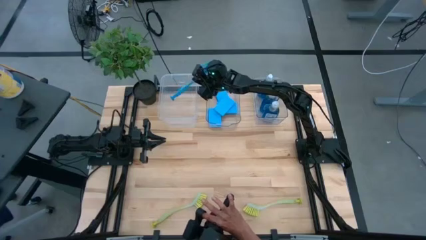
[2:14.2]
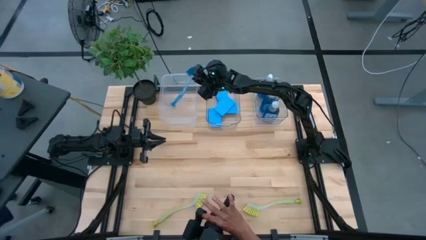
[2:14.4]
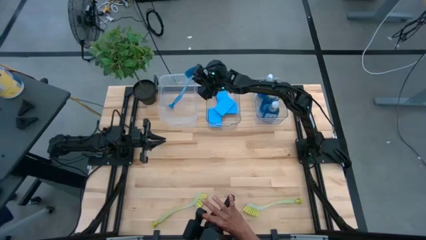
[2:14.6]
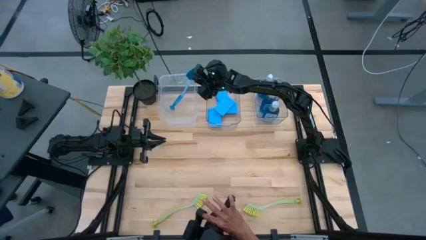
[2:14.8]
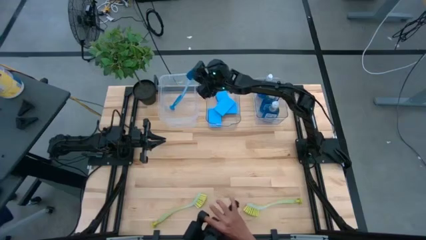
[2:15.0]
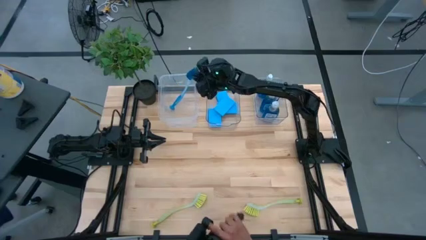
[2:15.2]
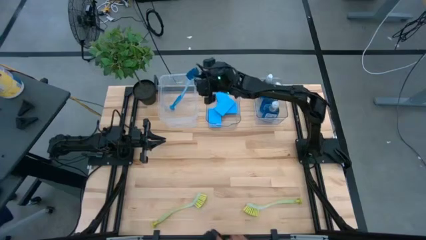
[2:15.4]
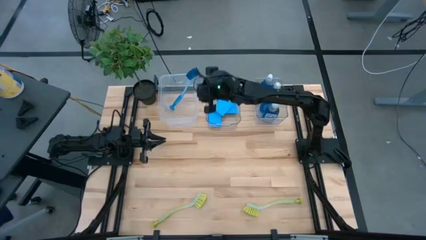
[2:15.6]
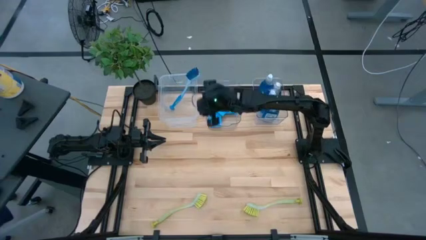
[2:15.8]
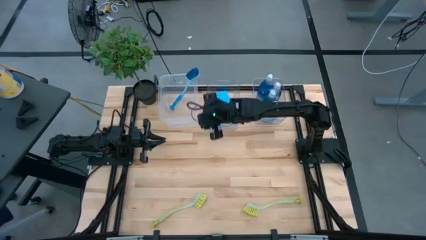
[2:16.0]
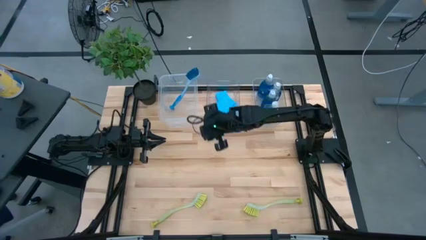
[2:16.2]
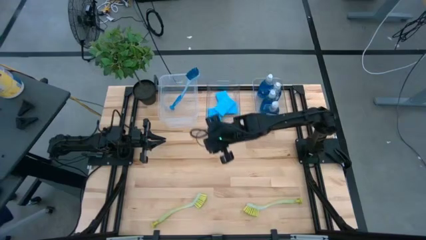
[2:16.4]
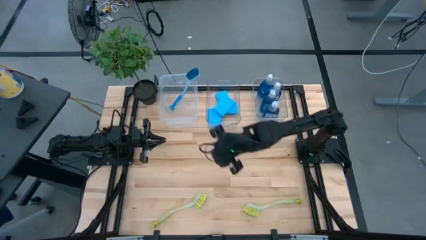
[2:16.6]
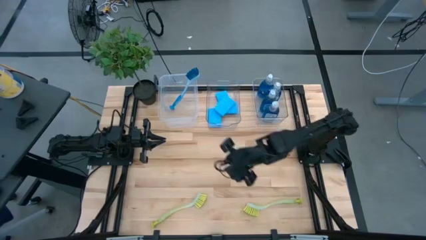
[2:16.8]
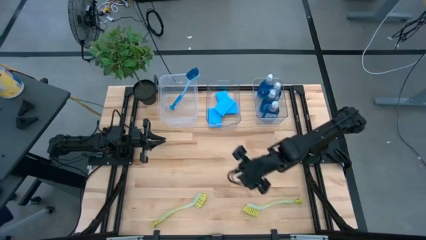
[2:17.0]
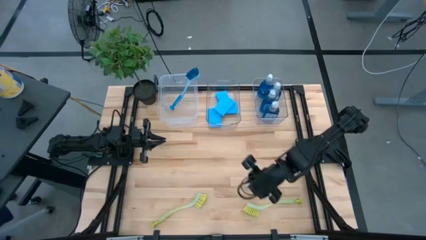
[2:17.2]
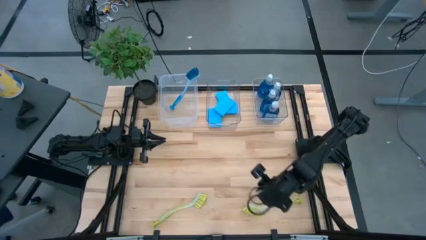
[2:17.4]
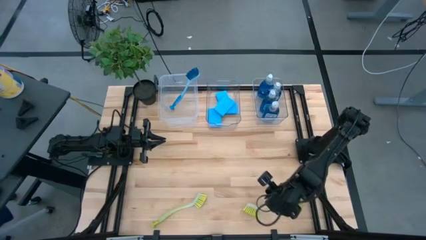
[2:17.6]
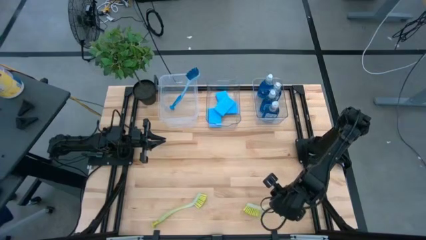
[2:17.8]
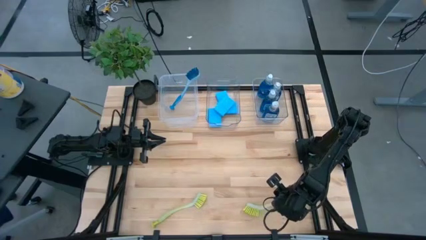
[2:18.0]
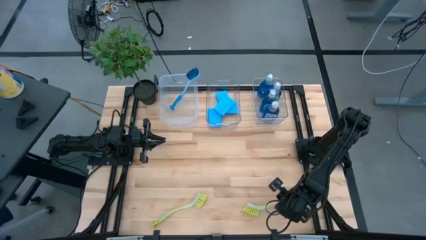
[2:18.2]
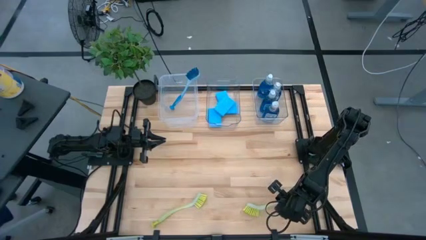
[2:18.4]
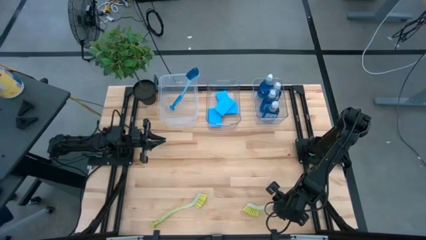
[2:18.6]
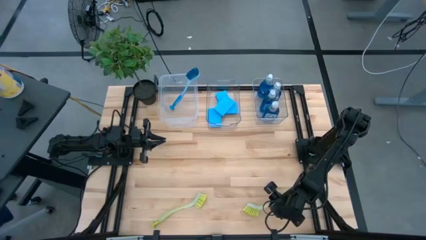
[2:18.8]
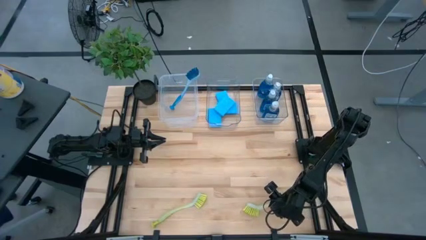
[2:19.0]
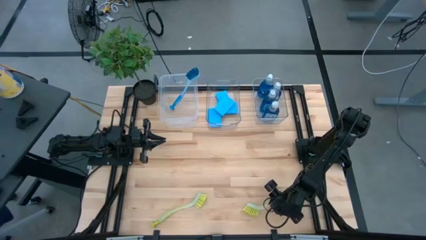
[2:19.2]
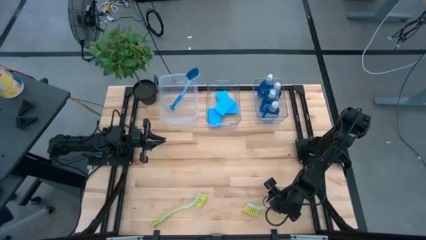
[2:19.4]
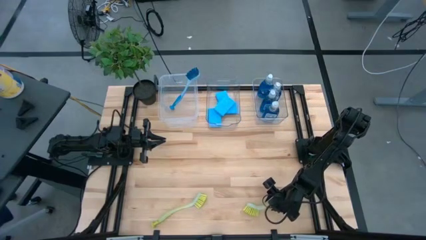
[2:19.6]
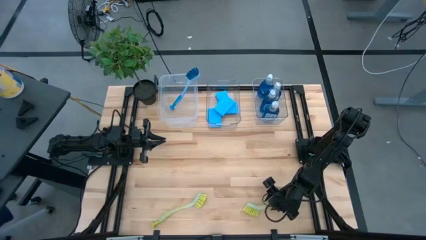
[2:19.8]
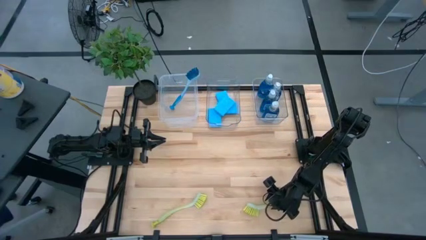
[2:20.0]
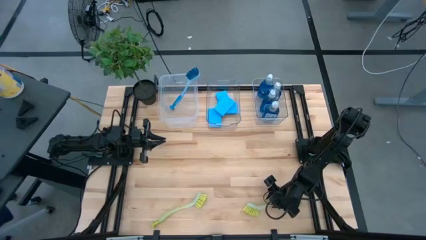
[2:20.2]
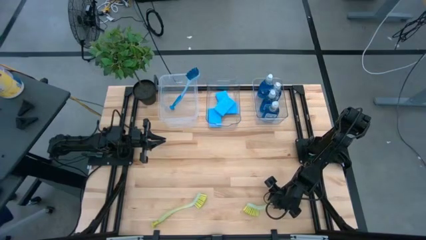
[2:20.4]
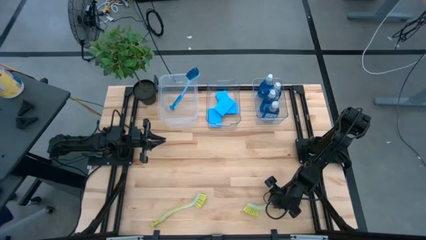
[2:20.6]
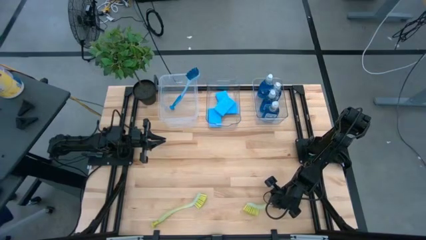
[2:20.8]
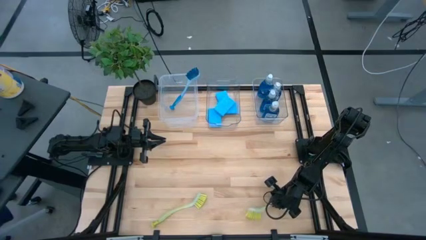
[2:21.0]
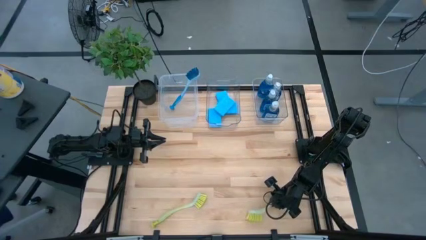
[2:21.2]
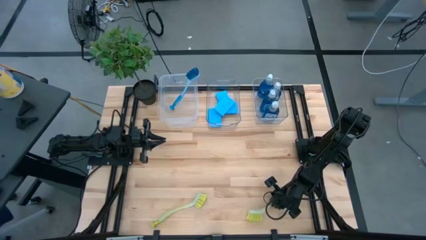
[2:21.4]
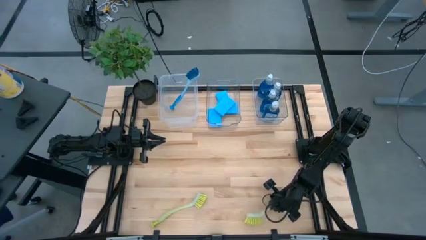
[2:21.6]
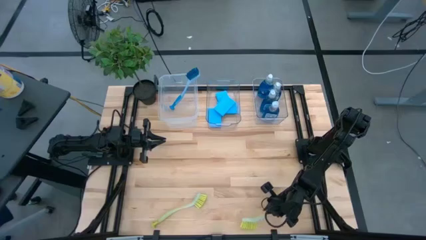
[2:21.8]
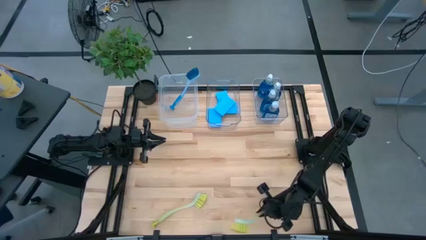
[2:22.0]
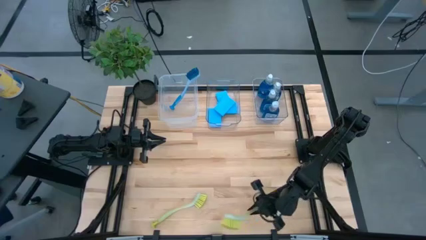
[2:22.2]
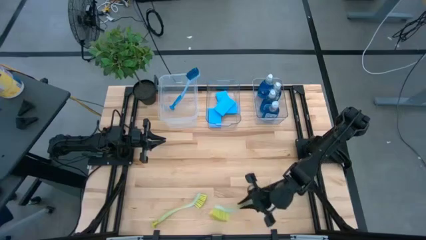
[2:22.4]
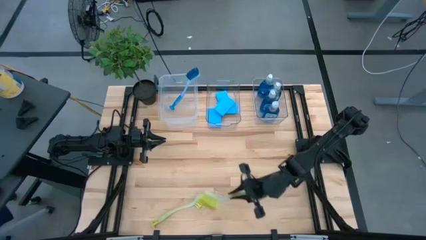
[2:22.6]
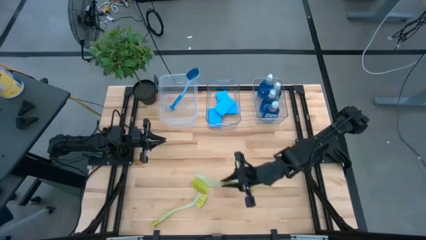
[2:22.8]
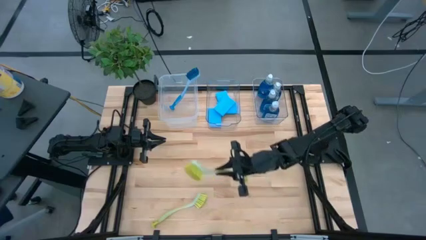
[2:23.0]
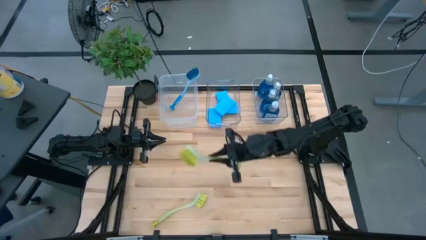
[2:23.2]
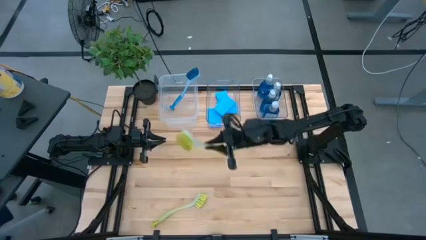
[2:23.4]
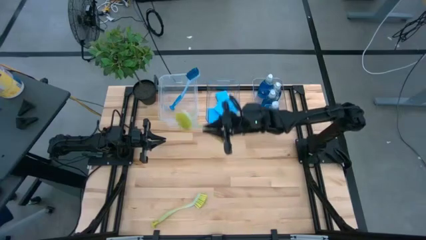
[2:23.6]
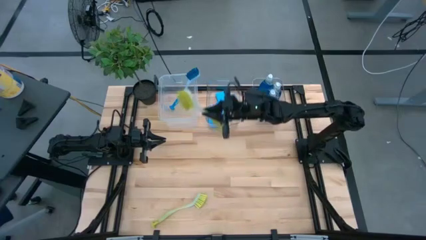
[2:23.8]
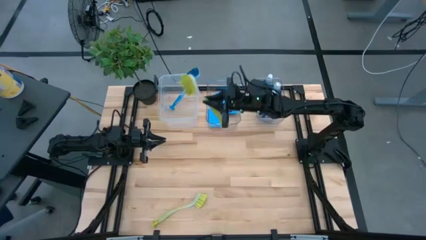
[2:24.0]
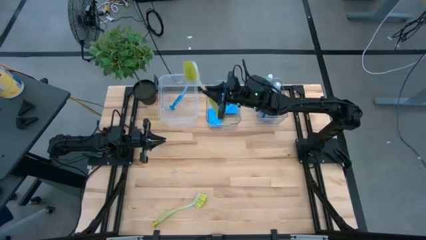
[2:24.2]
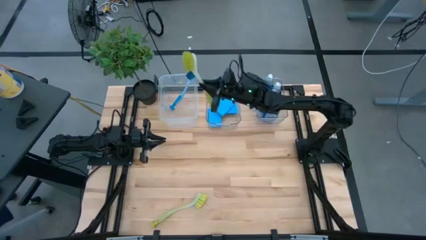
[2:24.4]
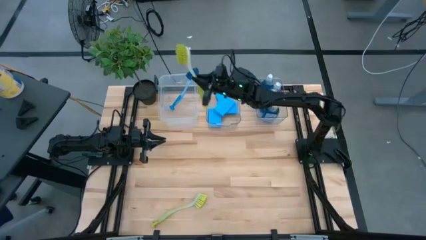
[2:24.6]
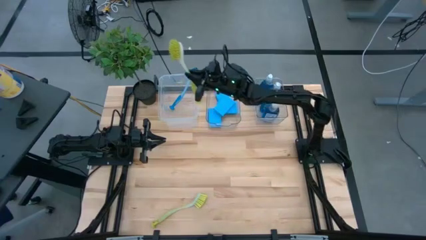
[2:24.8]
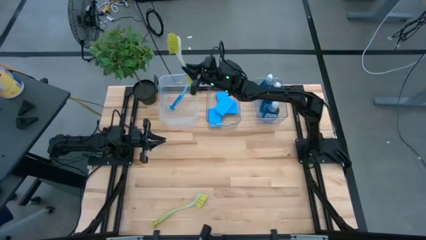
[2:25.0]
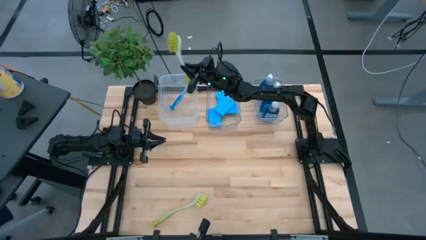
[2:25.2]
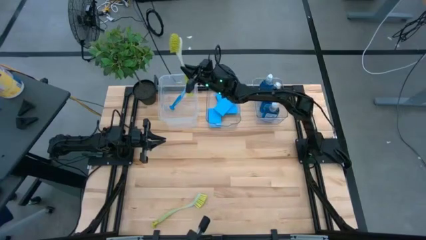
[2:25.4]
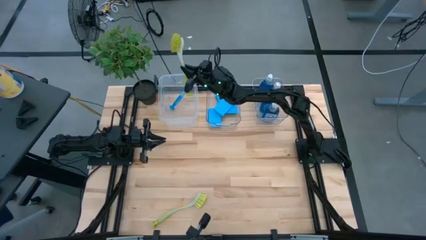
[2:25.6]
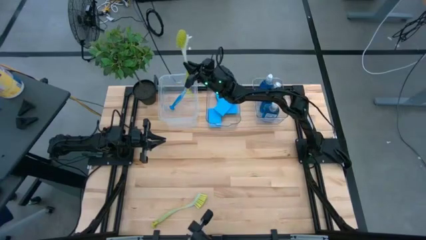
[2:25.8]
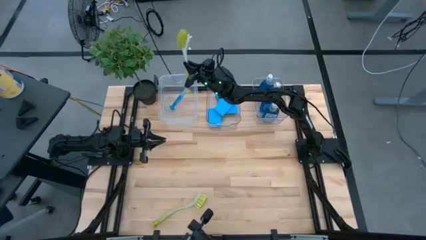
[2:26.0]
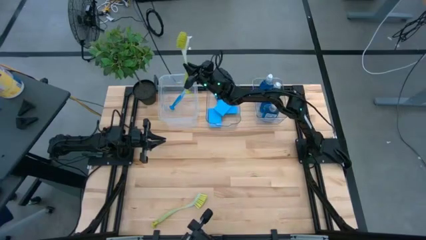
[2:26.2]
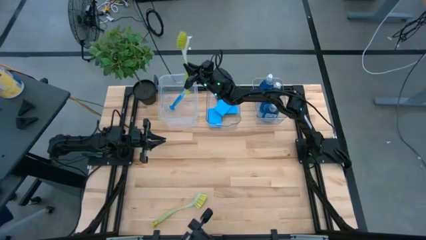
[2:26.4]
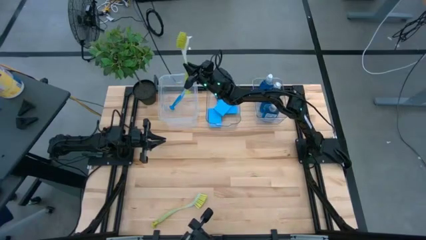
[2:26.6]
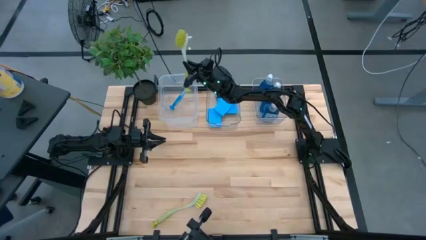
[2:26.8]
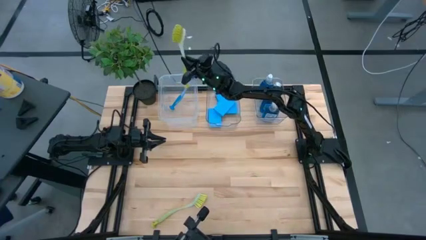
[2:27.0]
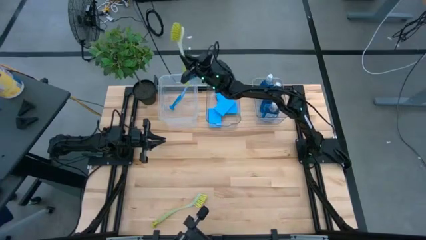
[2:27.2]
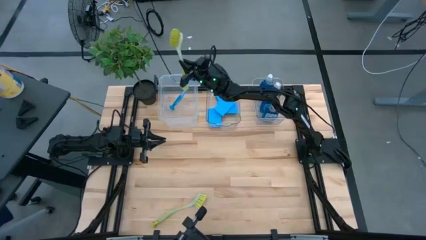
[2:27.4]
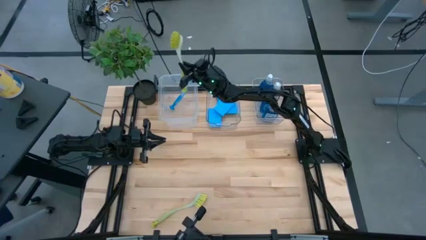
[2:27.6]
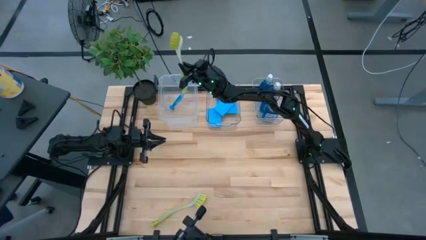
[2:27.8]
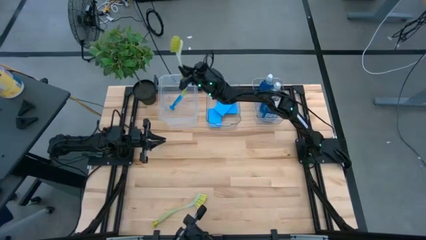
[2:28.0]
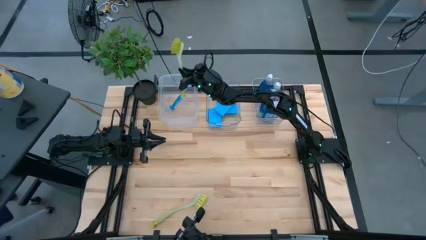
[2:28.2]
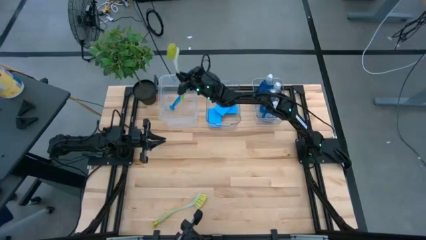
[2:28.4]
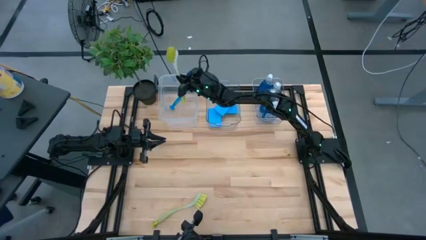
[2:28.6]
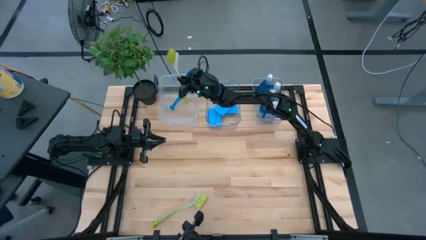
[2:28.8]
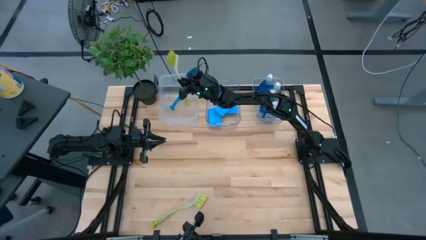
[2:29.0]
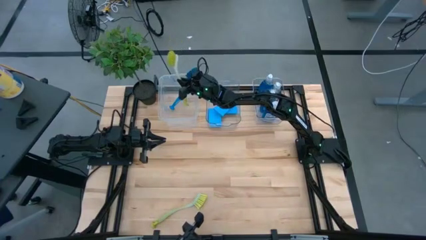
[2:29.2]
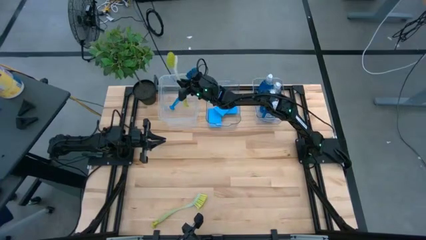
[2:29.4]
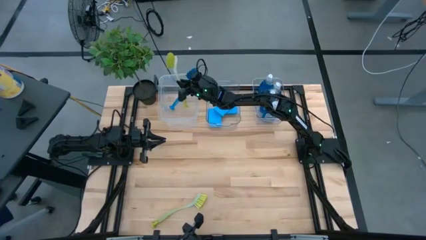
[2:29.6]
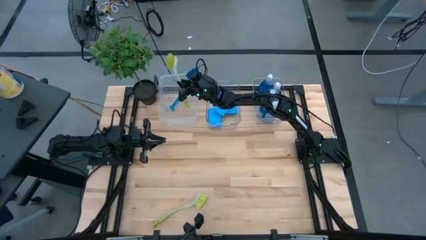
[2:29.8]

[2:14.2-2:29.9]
Task: Pick & Place Kitchen Sink Supplies
Put the yellow cleaning brush into the left transparent bin
